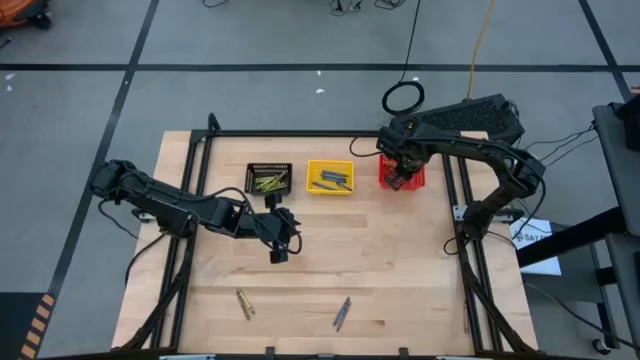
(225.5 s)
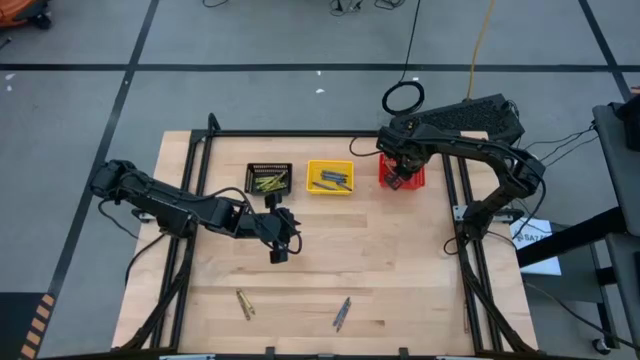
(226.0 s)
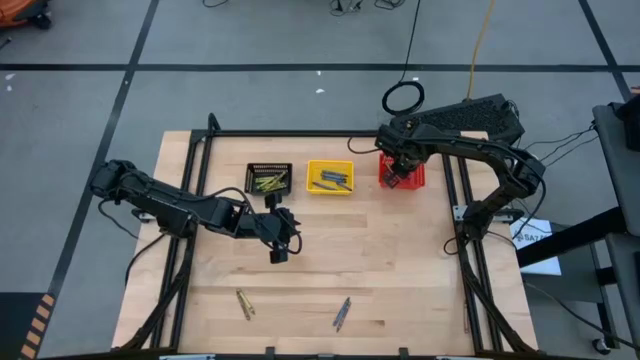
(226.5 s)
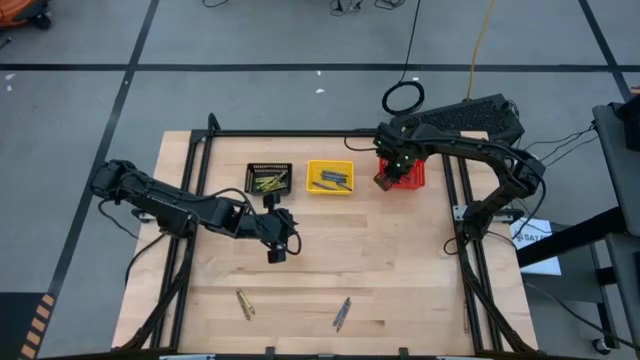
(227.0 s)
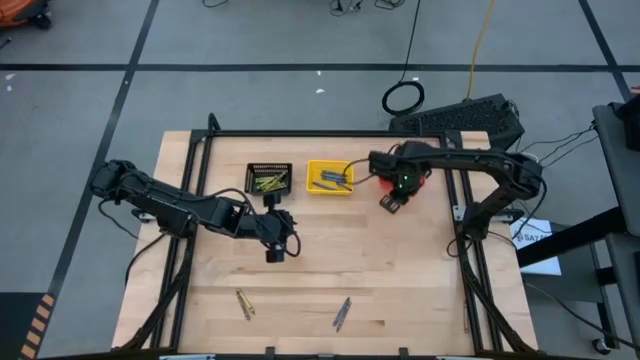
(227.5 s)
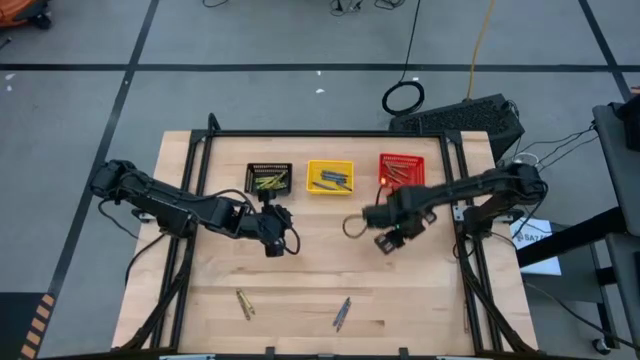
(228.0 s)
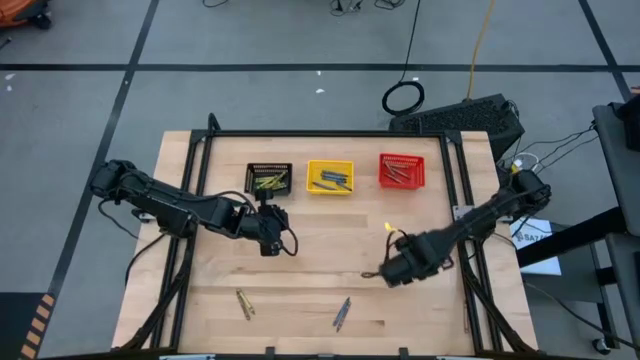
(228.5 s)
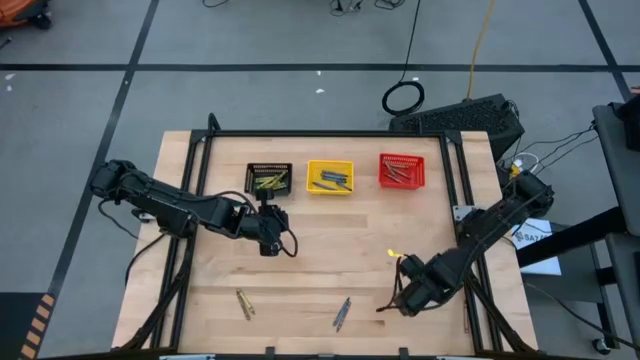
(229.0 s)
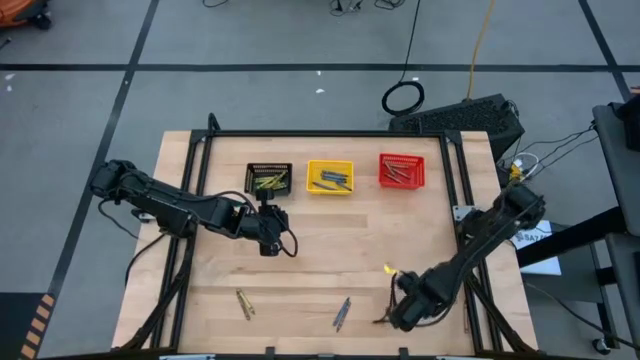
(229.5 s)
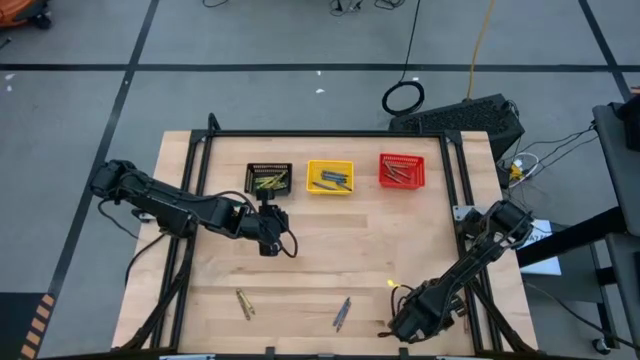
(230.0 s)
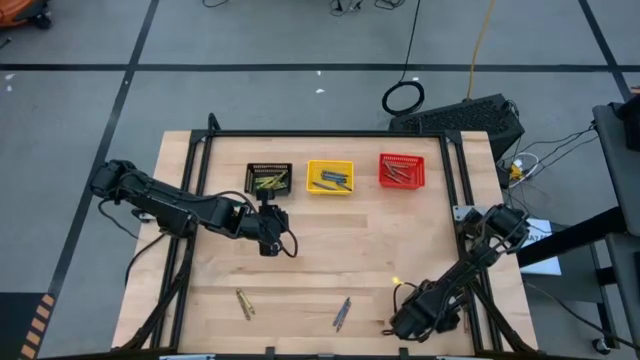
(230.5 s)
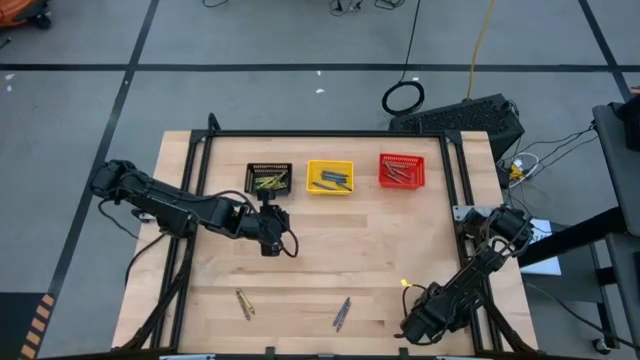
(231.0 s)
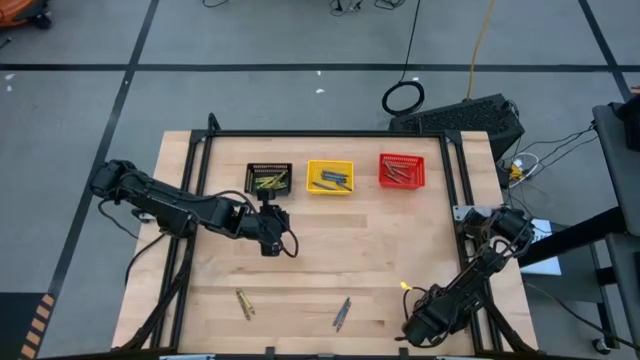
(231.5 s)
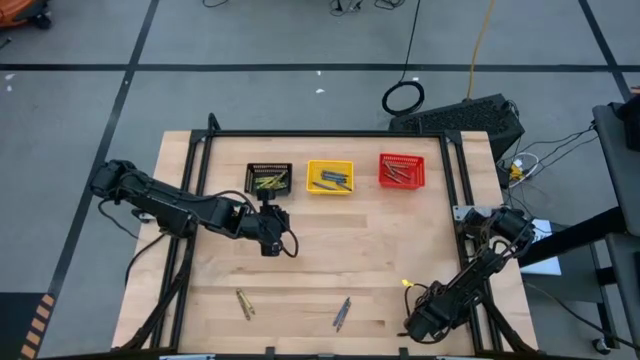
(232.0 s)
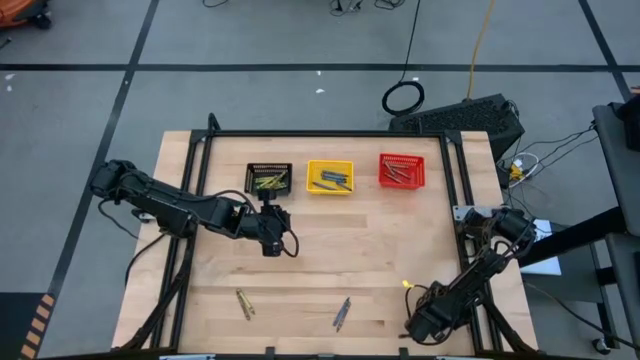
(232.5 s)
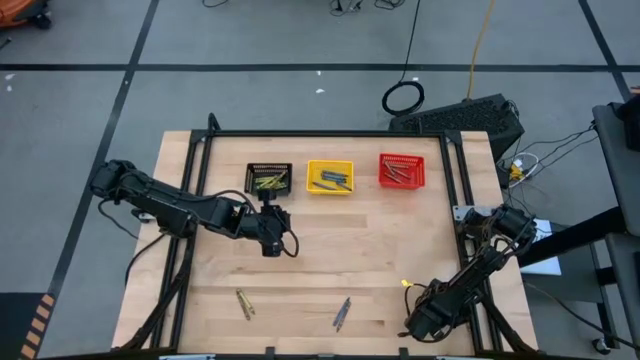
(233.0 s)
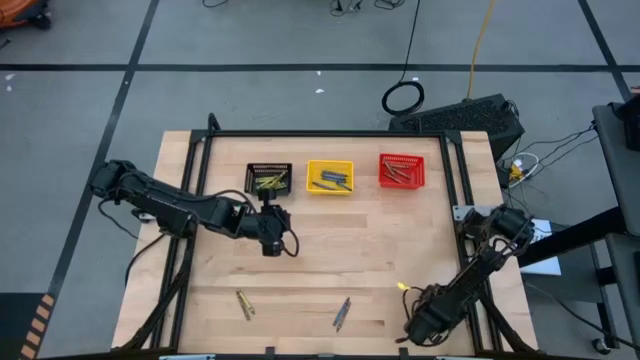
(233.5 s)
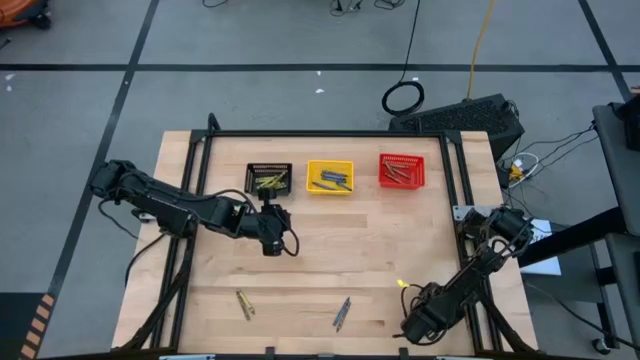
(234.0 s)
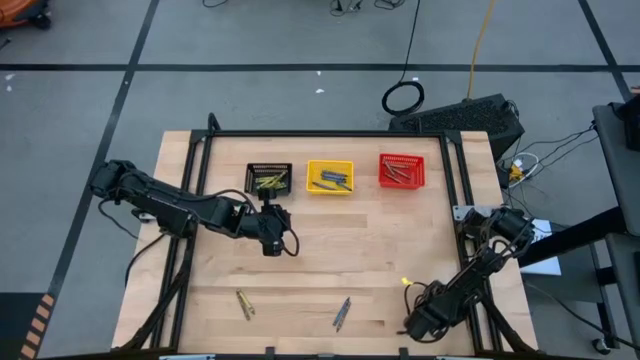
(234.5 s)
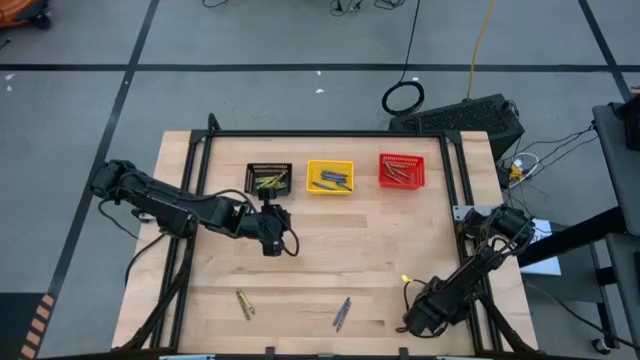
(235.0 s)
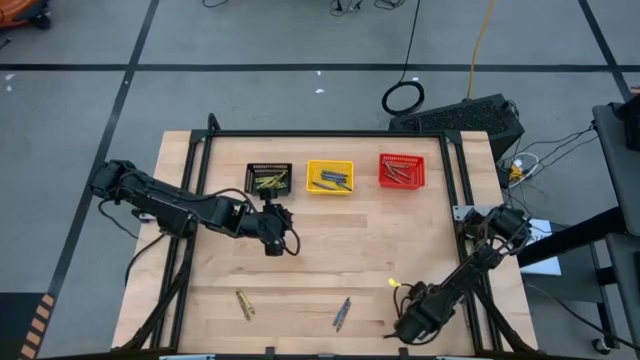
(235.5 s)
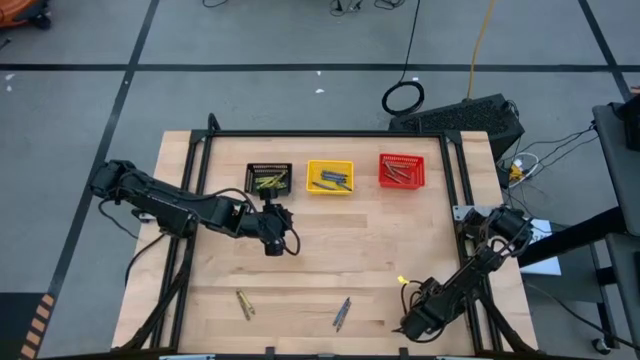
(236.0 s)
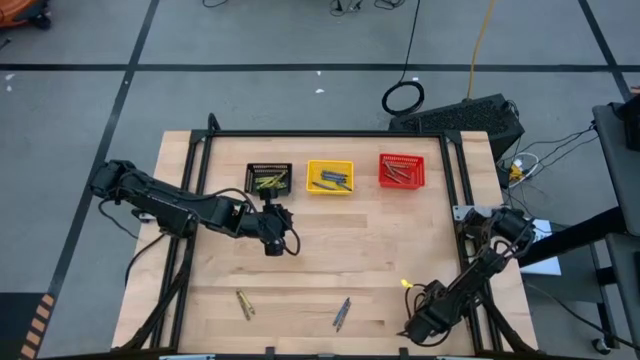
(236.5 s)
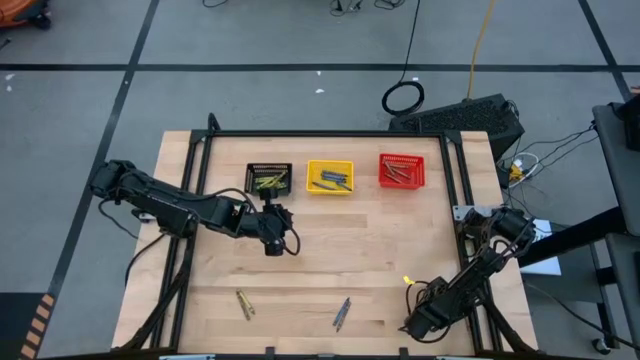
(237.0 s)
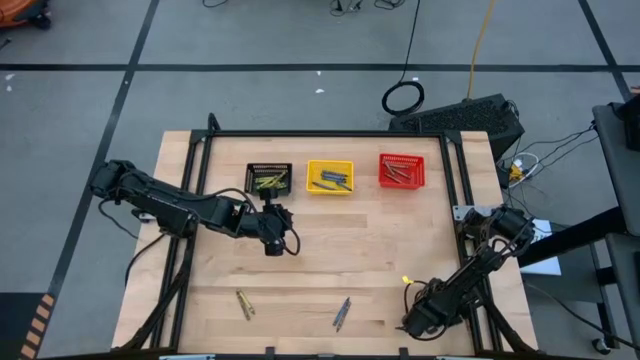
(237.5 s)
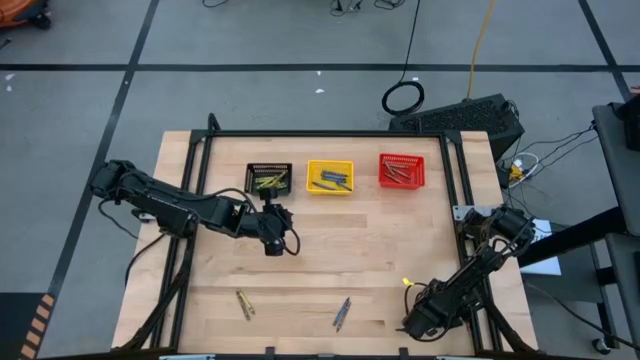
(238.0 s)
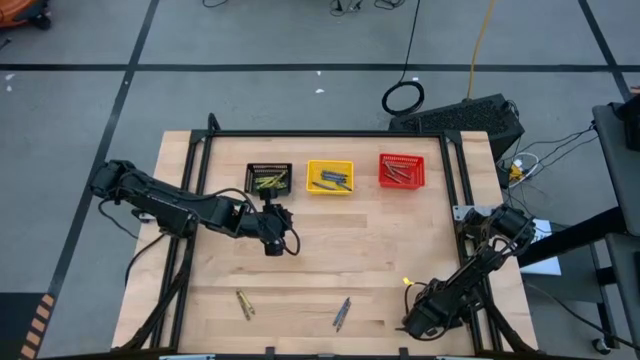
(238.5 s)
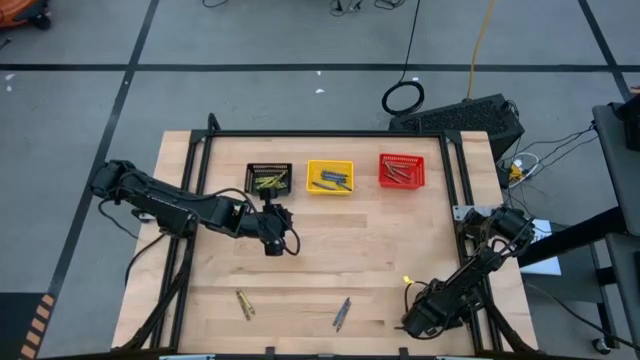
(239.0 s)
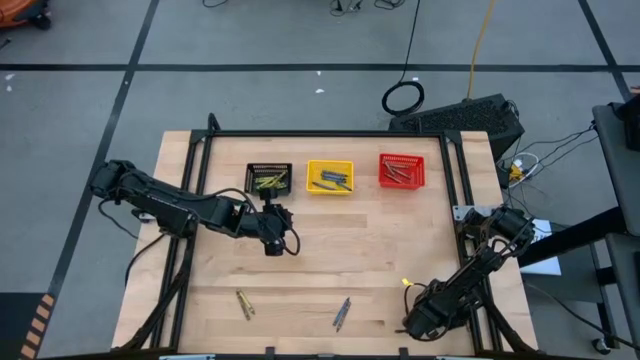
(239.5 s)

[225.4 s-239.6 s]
Task: Sort crayons
Put the brown crayon into the red bin

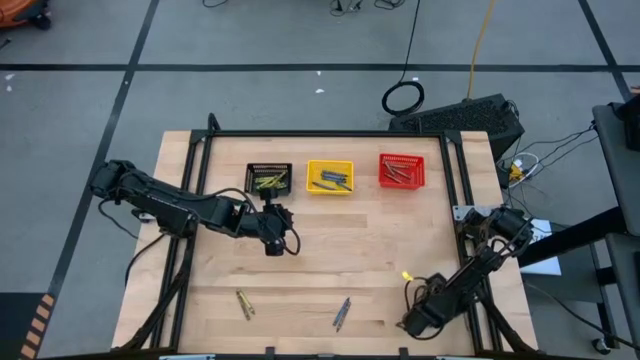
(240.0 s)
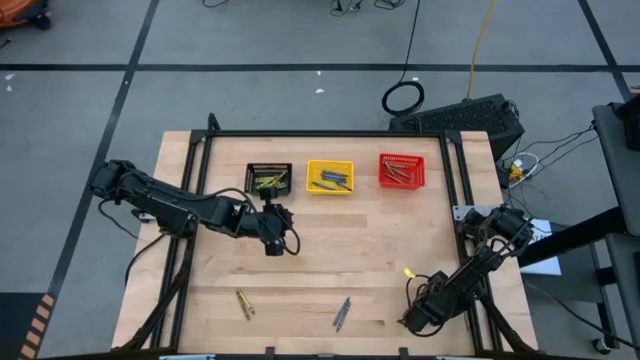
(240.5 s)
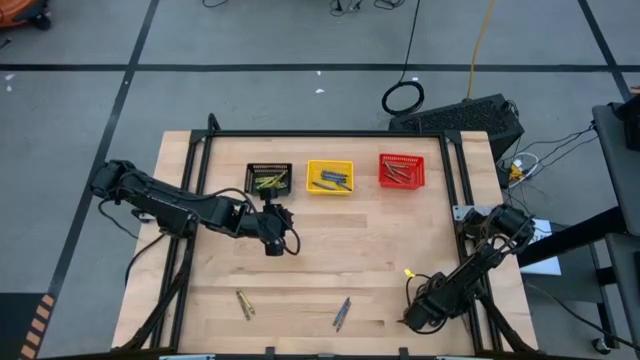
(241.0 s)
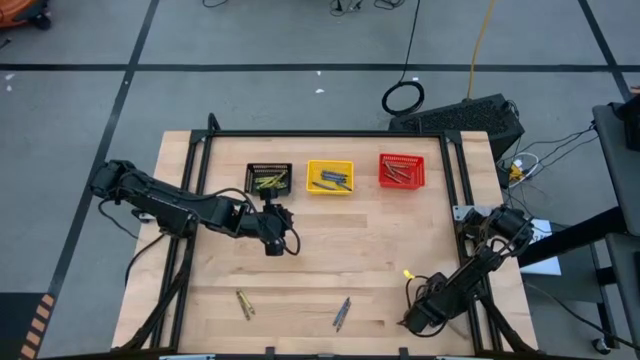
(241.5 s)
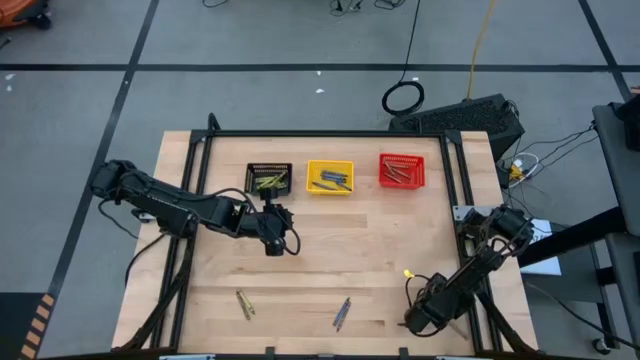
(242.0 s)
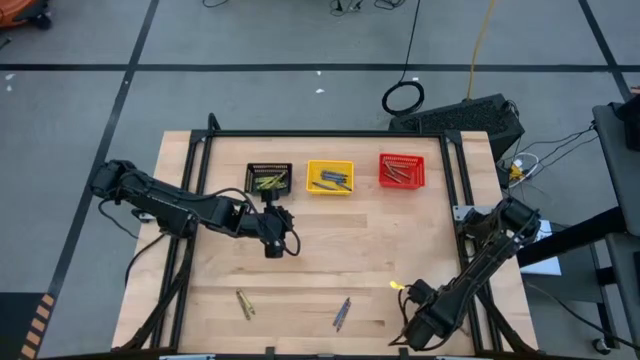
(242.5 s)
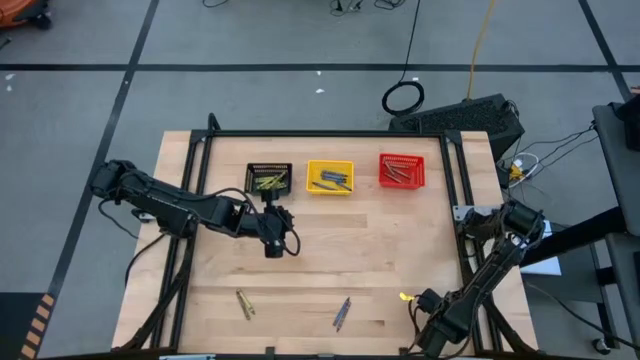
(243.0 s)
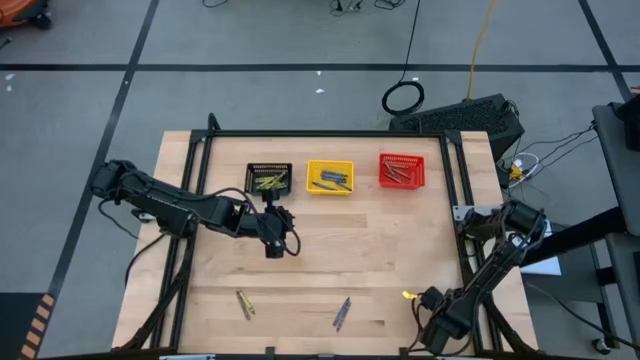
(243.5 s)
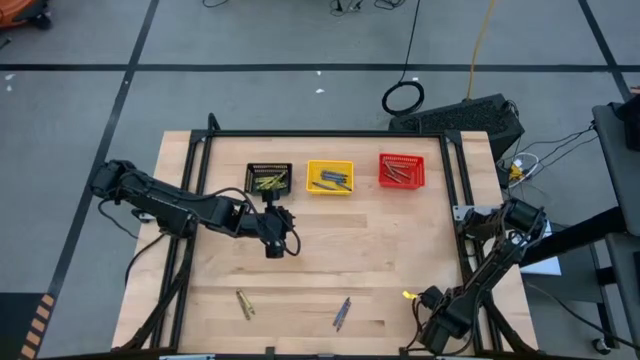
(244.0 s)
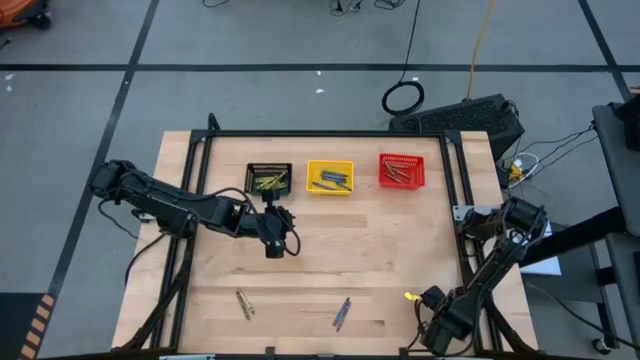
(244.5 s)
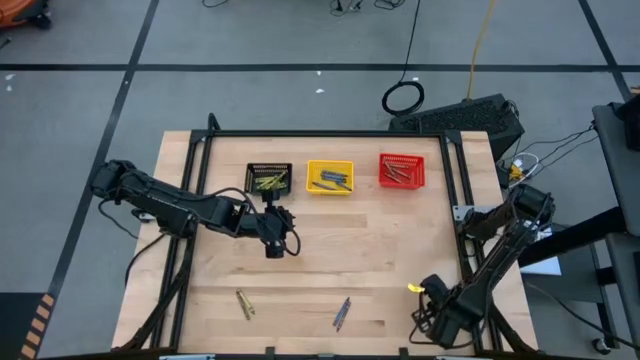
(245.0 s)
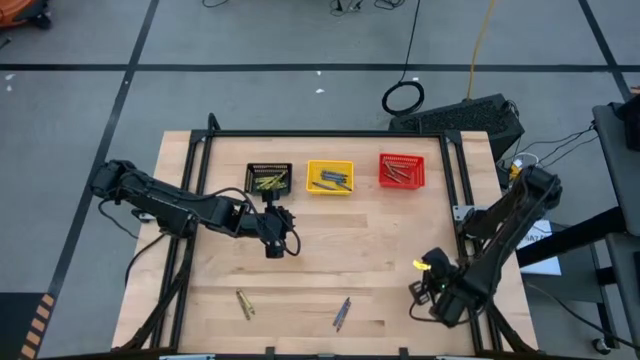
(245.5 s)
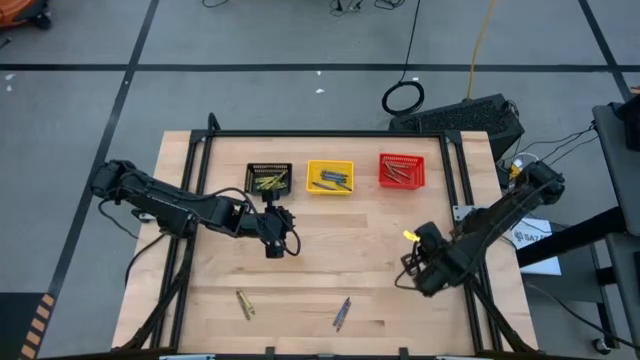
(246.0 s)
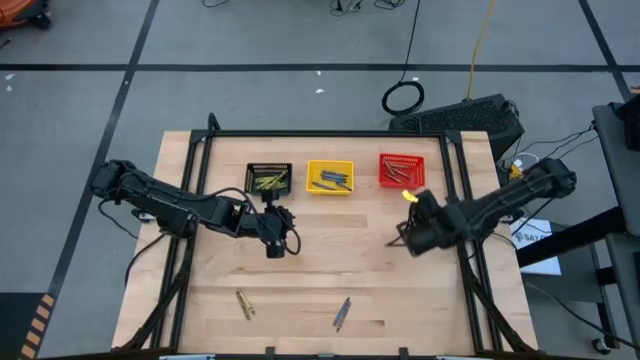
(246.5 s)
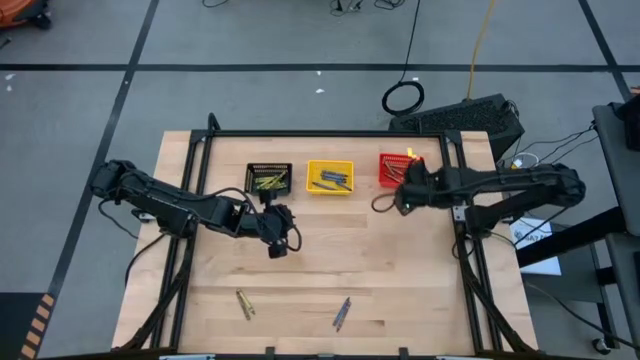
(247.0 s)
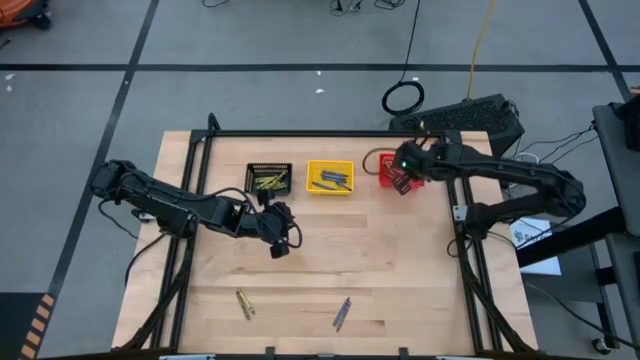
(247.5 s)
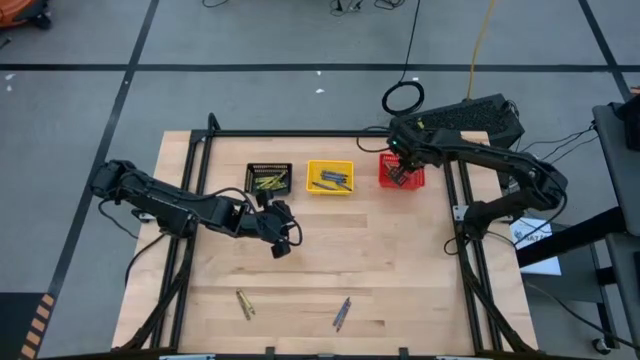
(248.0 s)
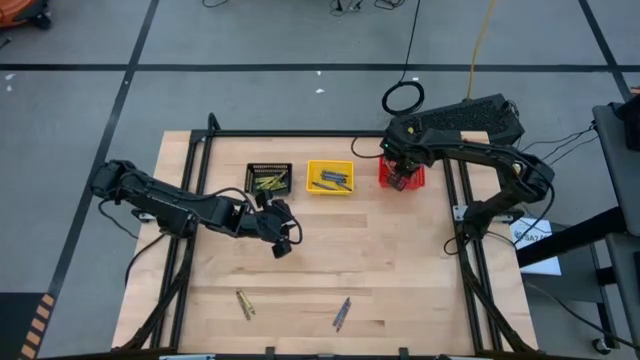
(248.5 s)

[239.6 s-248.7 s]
Put the brown crayon into the red bin
